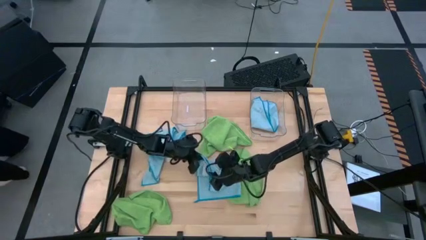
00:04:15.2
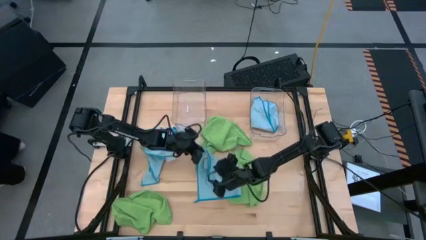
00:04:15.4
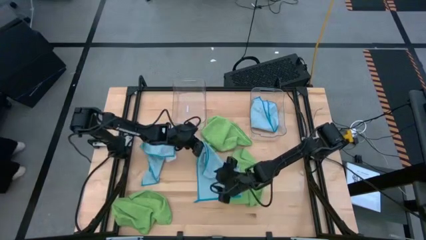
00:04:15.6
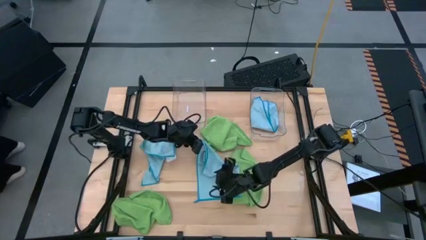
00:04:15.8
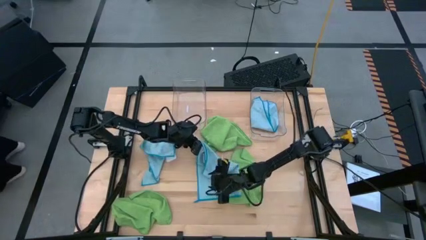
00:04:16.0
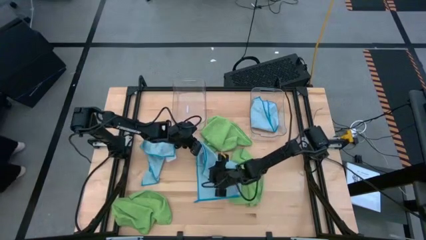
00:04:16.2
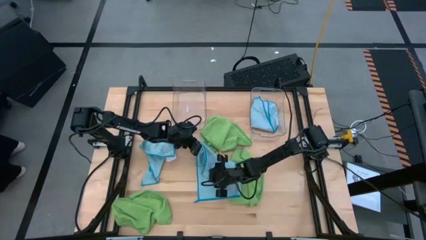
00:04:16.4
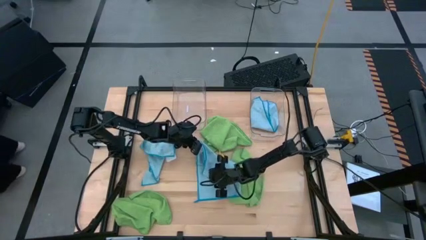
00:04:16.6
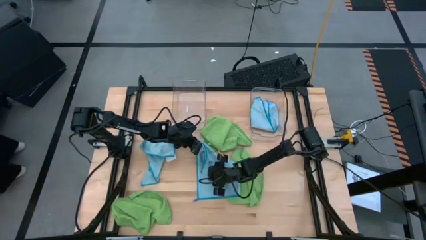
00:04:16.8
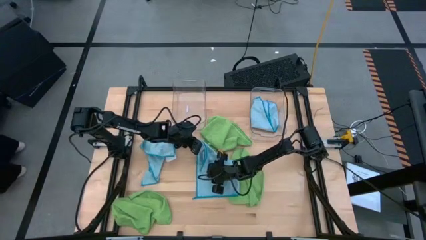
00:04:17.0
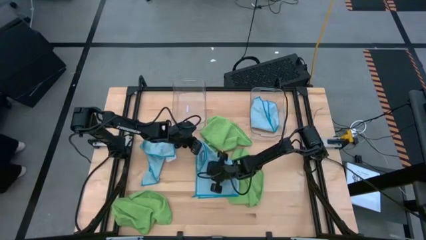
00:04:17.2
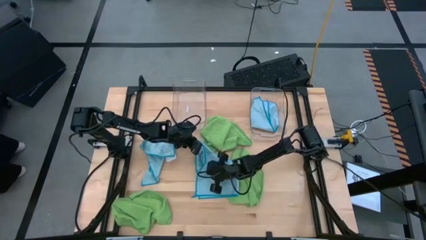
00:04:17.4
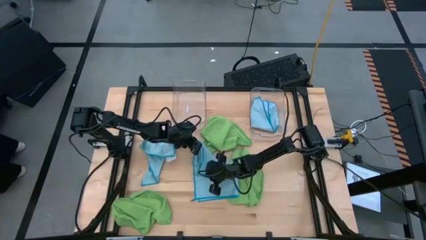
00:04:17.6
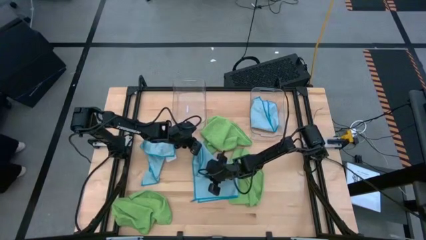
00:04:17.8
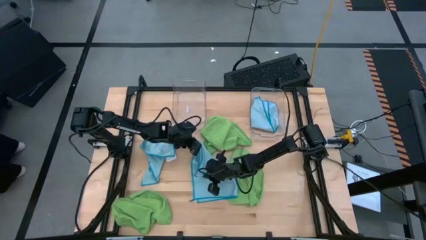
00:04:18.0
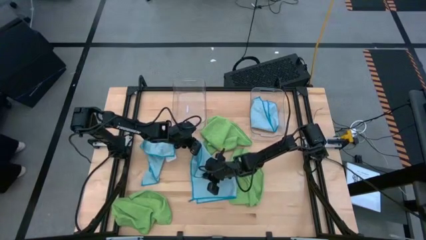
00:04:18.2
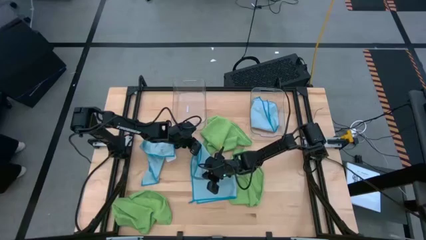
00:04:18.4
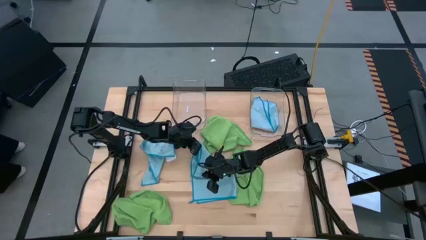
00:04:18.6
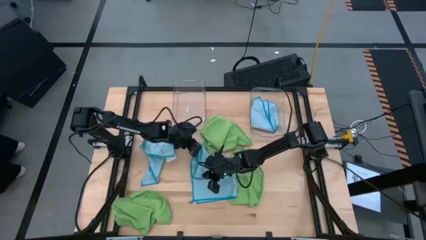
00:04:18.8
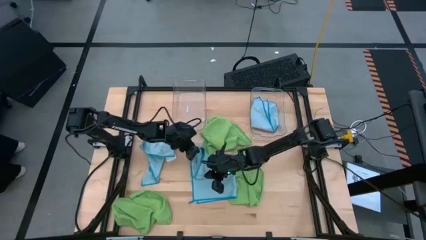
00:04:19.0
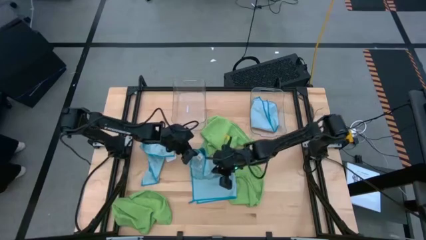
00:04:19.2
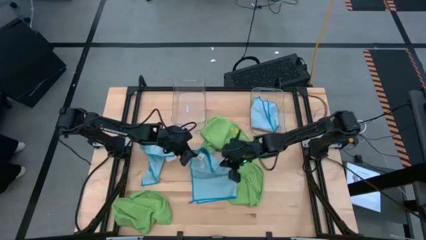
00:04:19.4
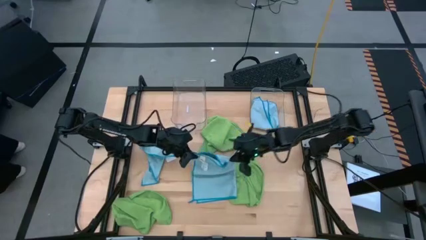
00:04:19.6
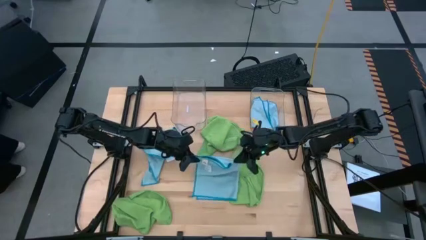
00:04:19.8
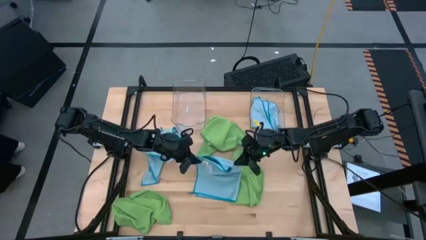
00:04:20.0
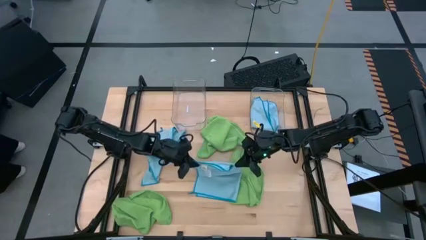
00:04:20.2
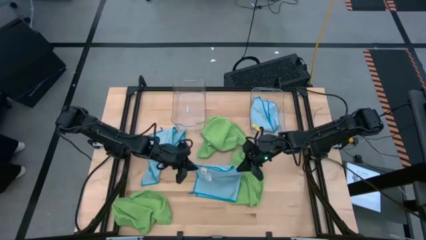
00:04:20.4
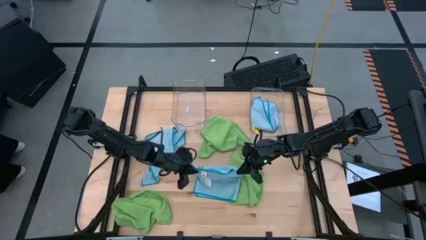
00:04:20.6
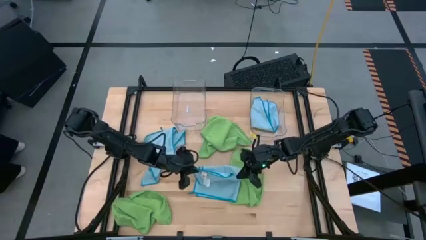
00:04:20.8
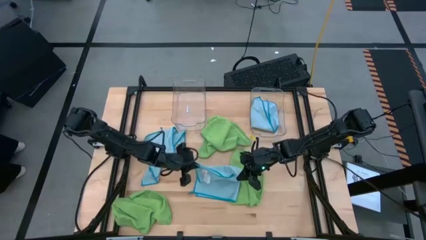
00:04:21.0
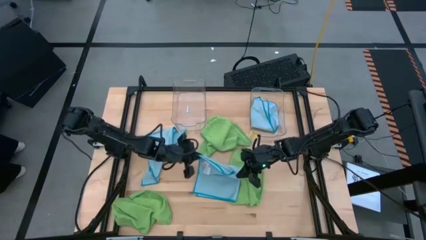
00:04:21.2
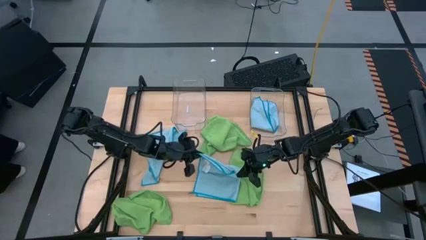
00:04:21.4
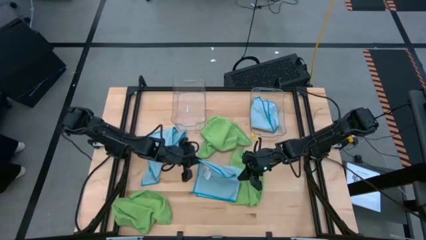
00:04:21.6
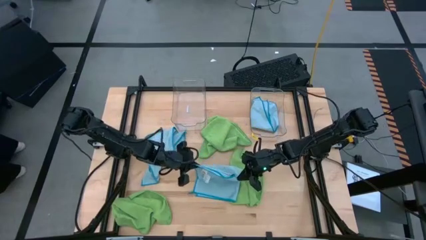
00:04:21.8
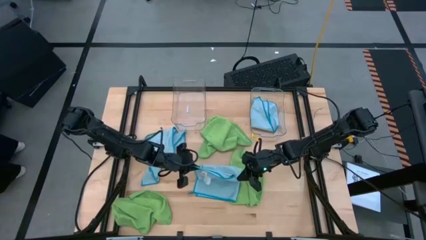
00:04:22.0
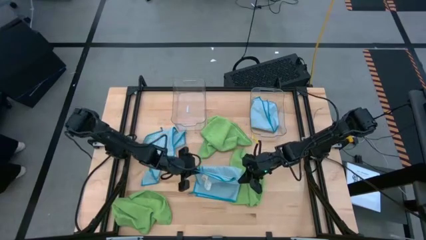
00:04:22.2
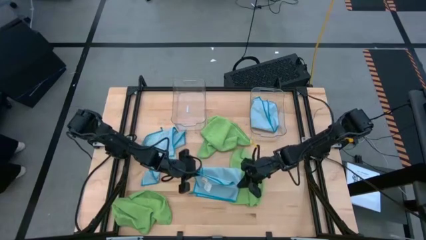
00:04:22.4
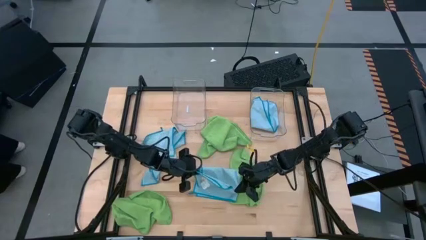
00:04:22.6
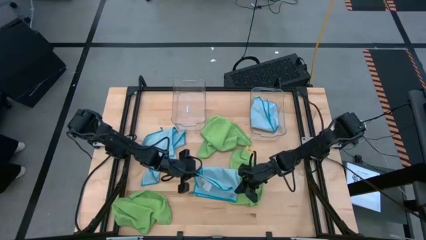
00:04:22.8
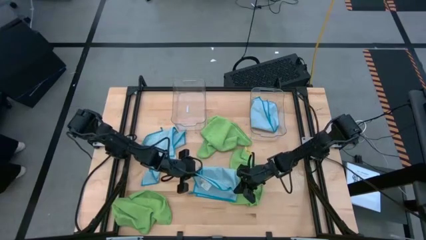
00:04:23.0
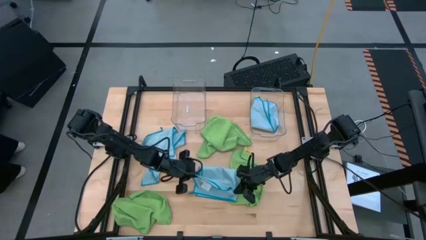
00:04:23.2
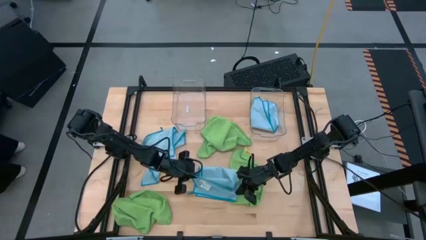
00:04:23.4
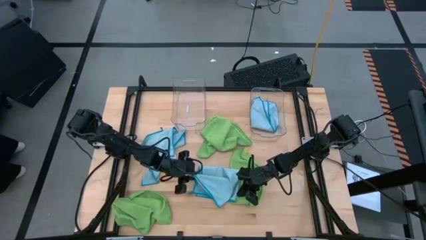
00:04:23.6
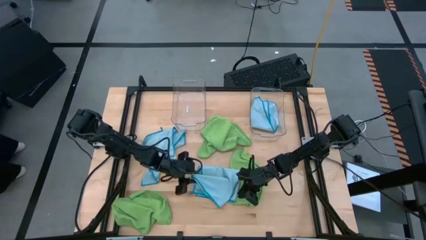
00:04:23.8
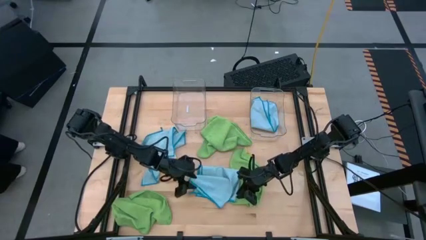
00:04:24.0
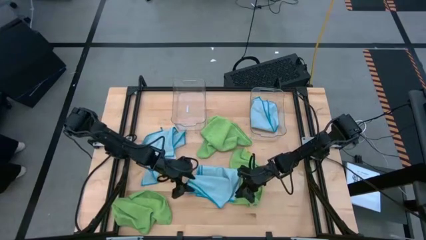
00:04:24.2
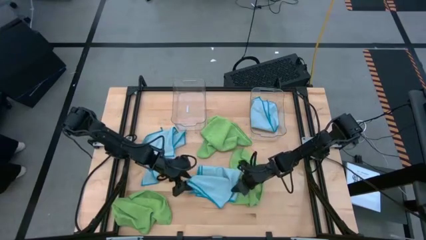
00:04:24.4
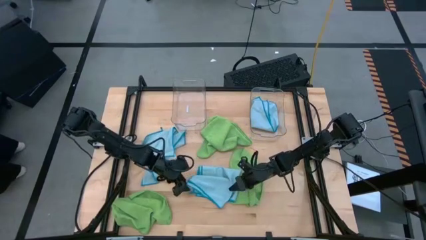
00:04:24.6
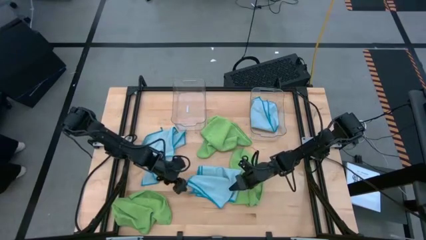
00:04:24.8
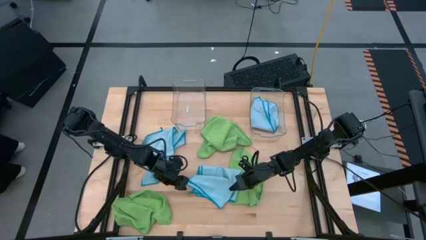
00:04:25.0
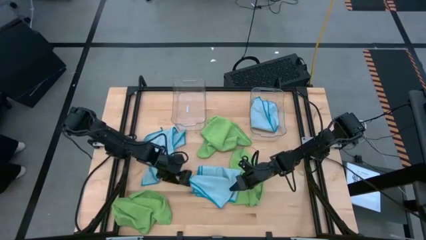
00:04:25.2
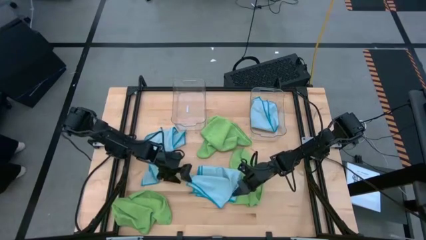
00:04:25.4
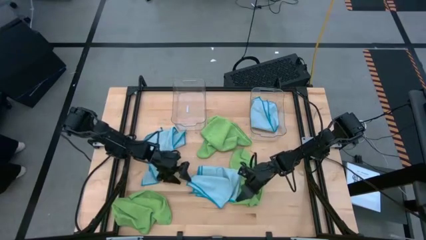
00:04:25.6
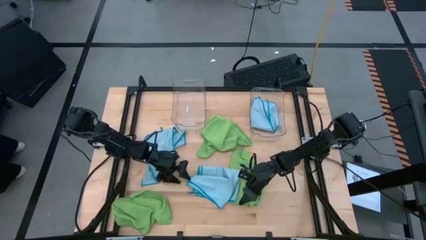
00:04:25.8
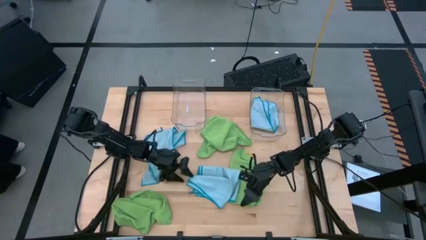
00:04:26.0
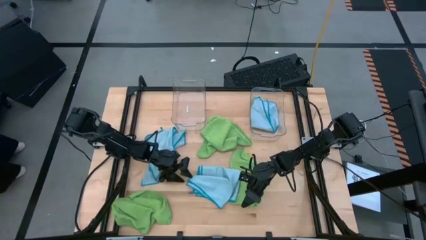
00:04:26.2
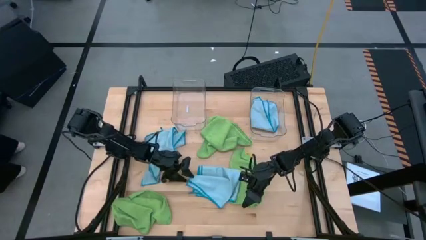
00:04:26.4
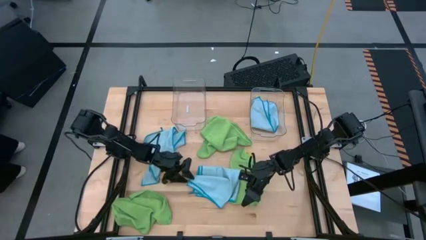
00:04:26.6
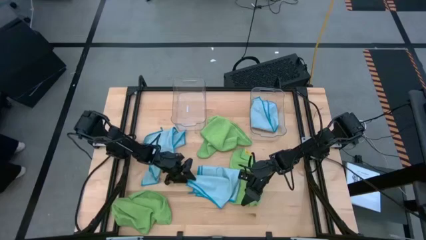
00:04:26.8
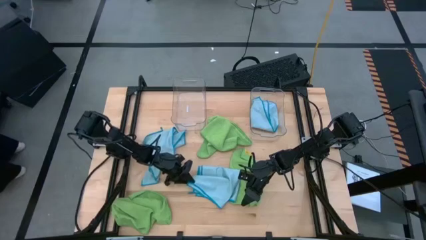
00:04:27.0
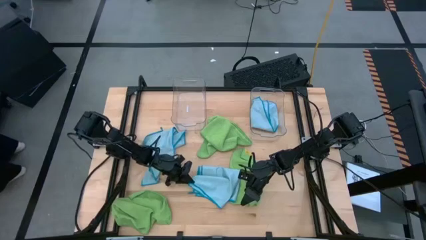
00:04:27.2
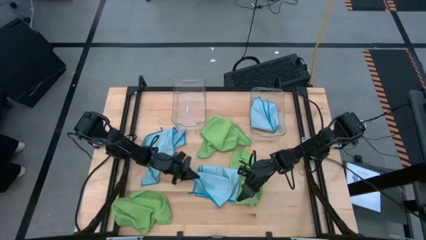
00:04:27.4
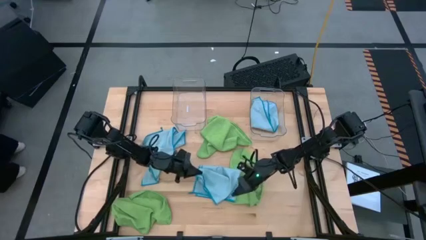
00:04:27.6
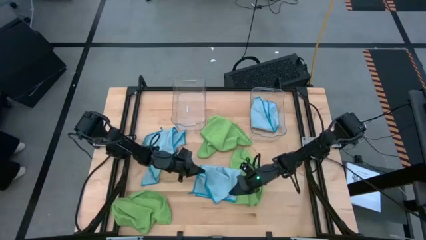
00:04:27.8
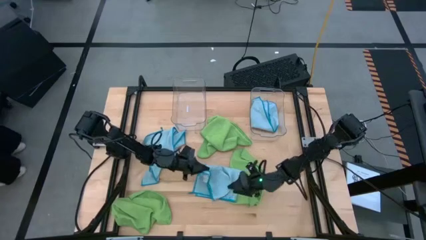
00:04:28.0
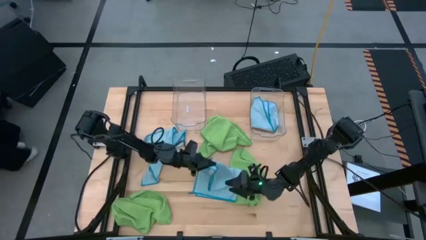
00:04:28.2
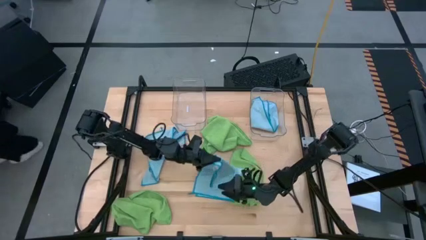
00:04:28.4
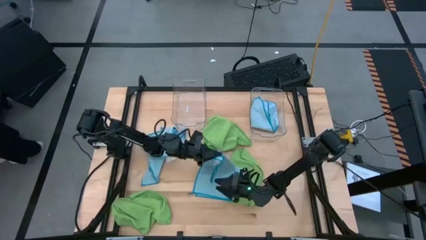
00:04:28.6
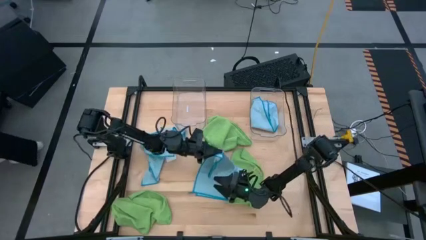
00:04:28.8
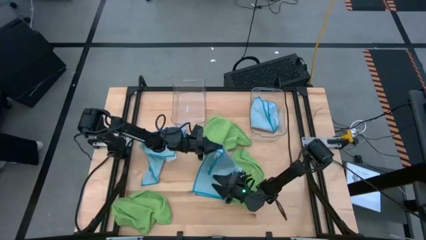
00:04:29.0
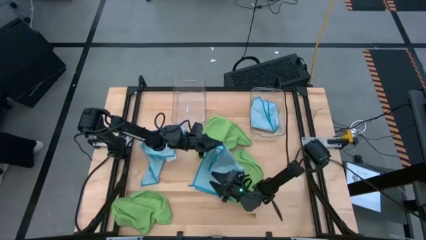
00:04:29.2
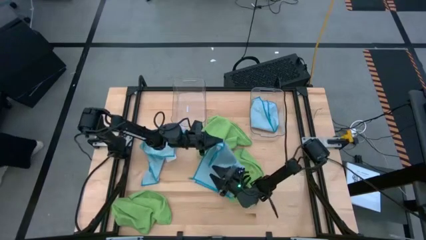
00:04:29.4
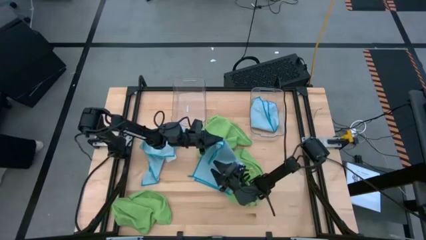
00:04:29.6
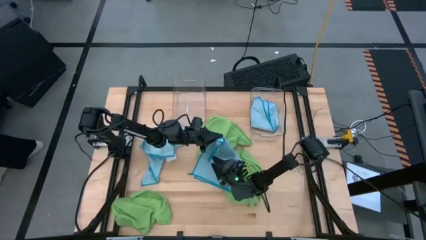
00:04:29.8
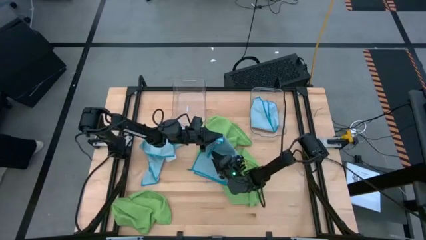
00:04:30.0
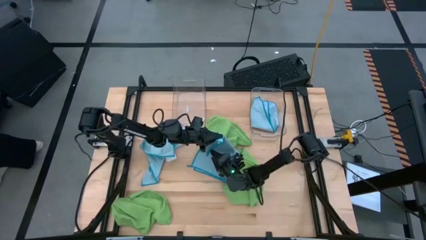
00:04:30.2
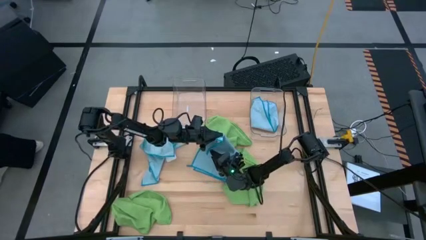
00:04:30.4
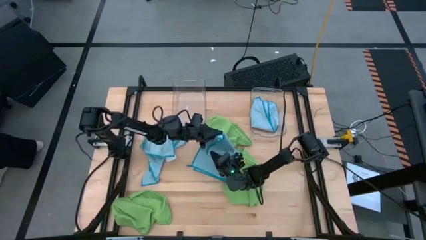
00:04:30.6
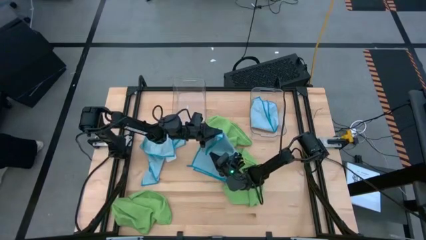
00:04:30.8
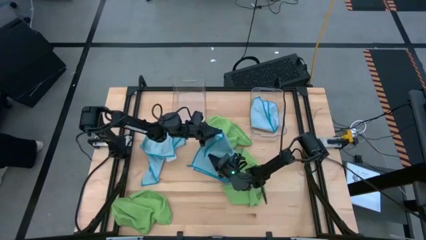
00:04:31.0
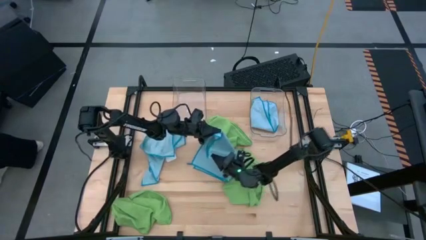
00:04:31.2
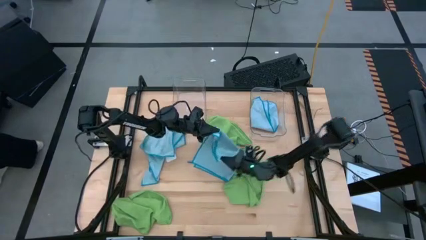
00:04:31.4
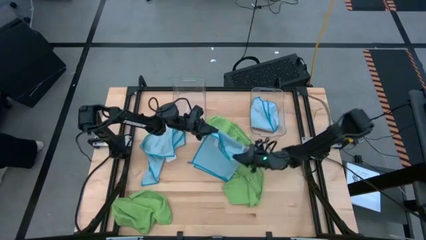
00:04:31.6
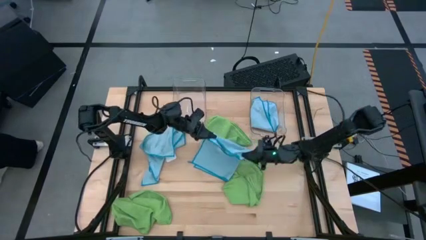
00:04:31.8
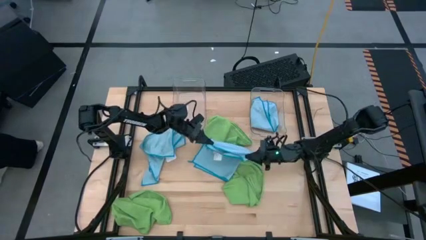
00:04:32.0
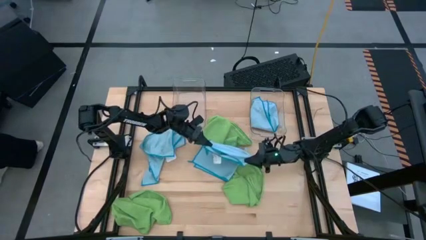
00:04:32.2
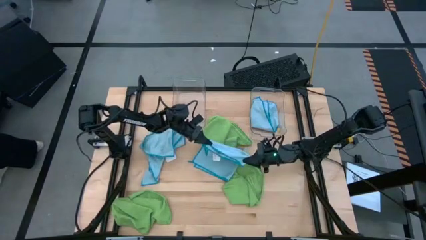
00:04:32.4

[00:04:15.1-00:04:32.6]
Task: Fold microfiber towels
Fold the right blue microfiber towel
